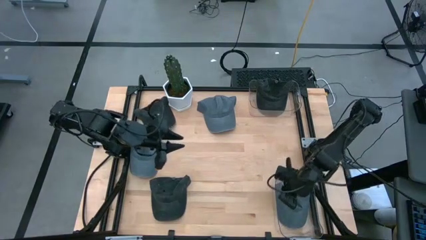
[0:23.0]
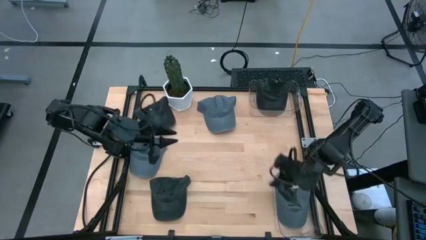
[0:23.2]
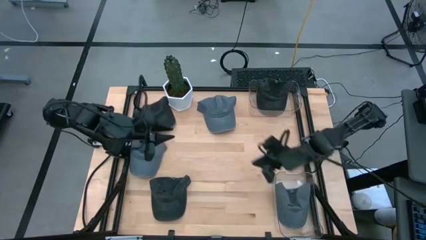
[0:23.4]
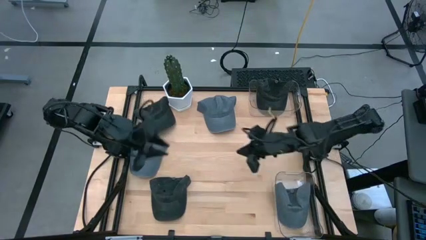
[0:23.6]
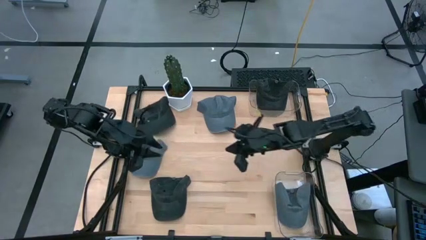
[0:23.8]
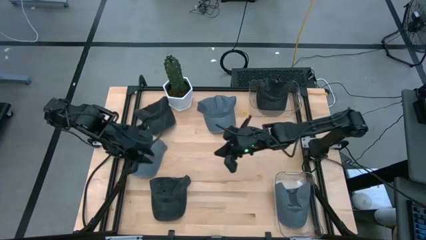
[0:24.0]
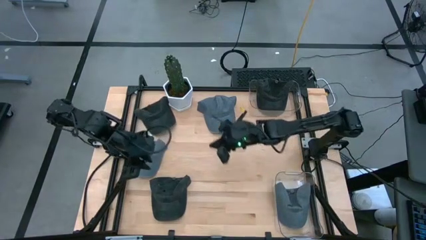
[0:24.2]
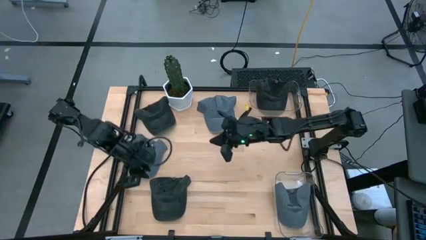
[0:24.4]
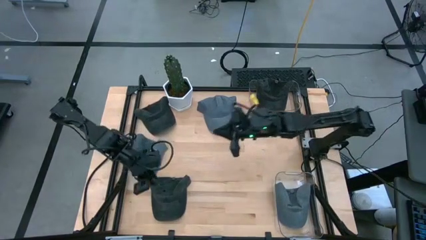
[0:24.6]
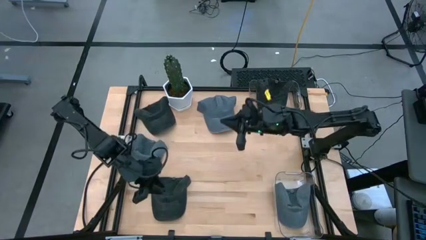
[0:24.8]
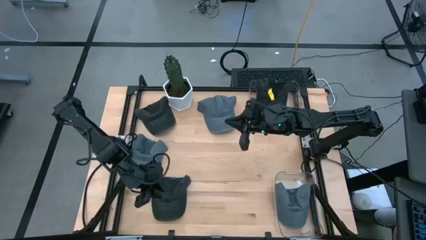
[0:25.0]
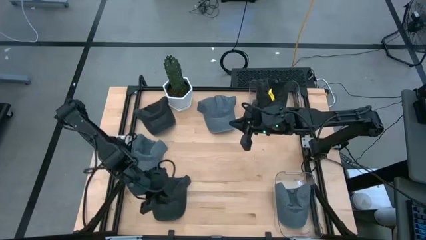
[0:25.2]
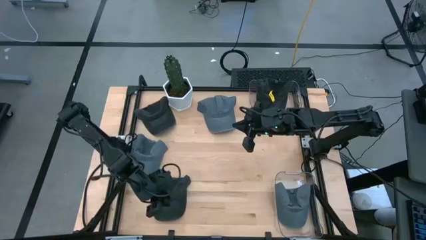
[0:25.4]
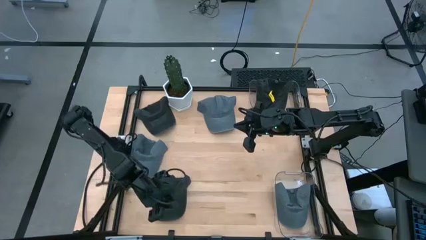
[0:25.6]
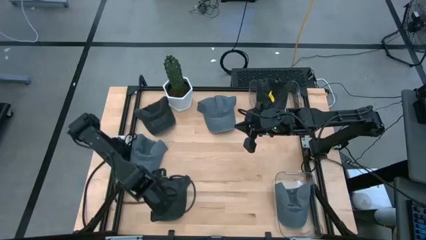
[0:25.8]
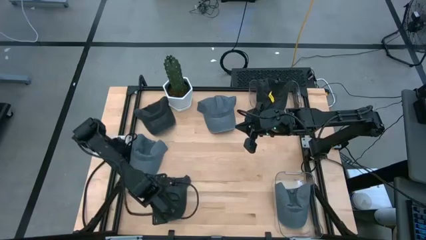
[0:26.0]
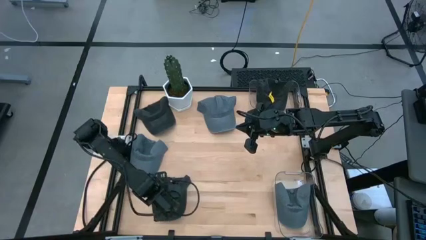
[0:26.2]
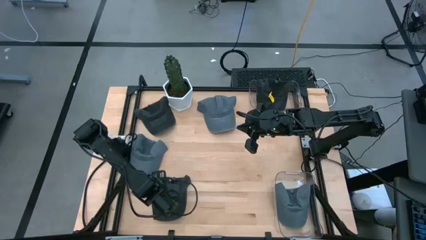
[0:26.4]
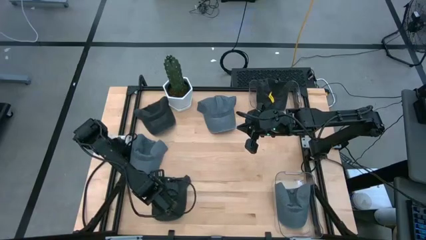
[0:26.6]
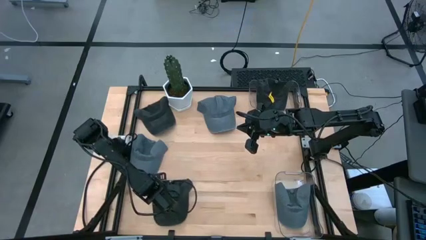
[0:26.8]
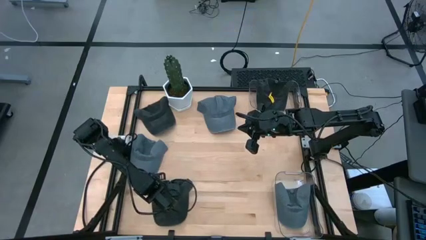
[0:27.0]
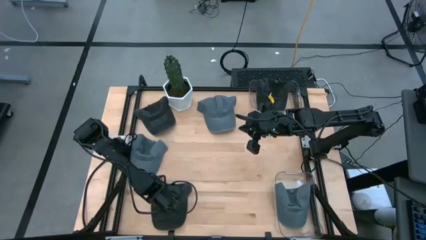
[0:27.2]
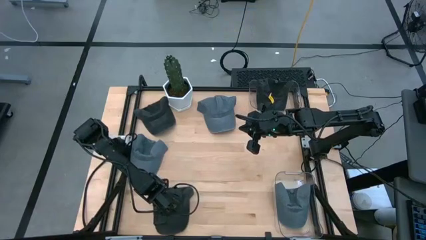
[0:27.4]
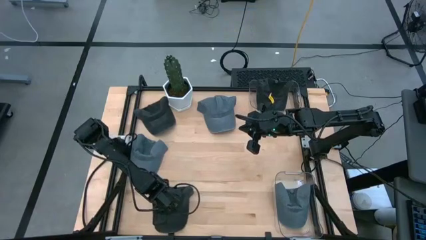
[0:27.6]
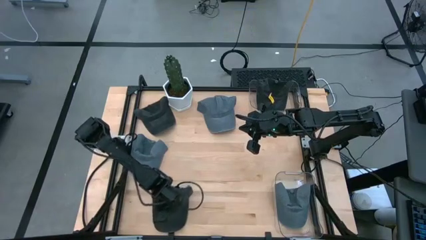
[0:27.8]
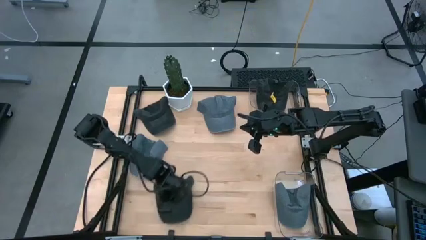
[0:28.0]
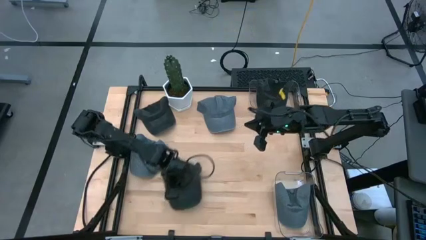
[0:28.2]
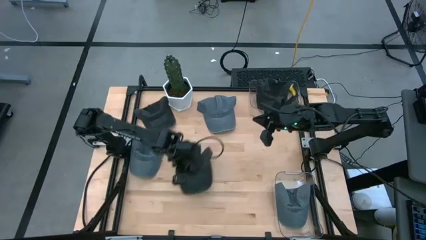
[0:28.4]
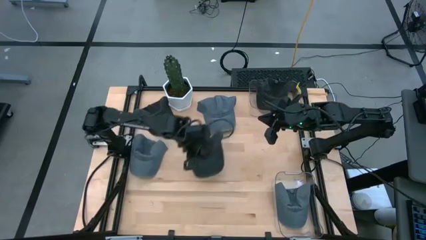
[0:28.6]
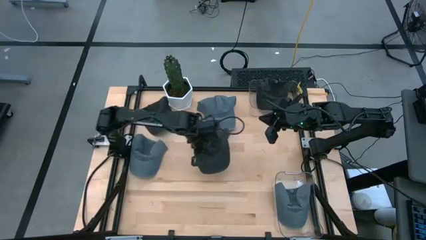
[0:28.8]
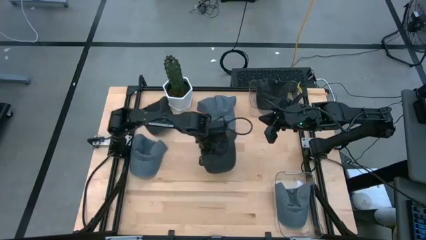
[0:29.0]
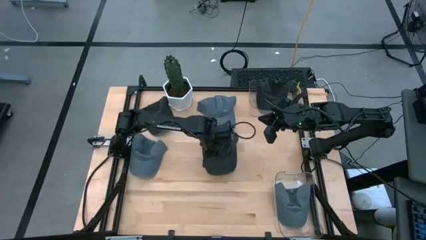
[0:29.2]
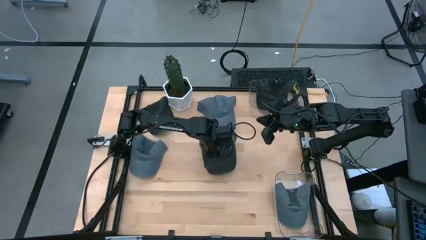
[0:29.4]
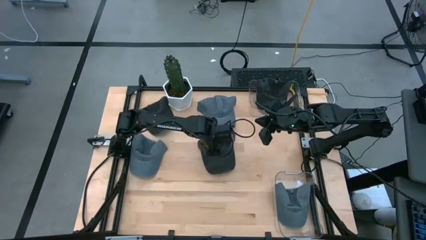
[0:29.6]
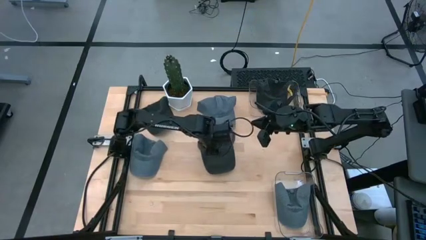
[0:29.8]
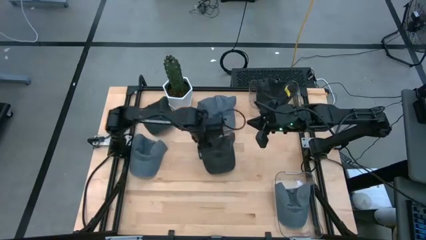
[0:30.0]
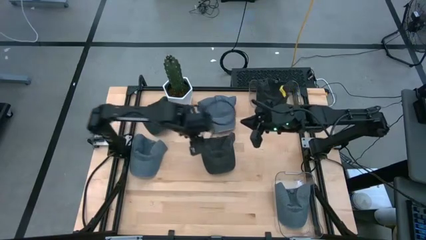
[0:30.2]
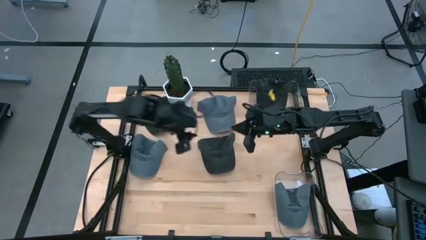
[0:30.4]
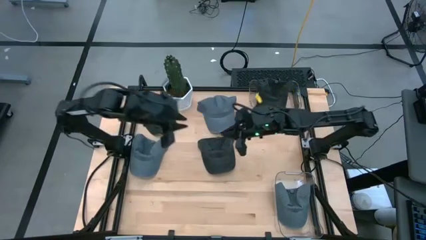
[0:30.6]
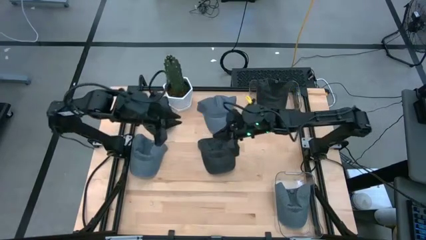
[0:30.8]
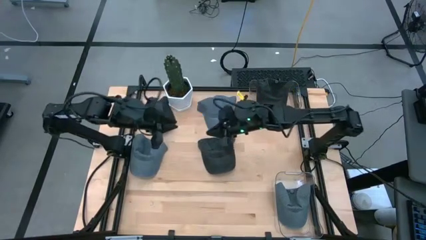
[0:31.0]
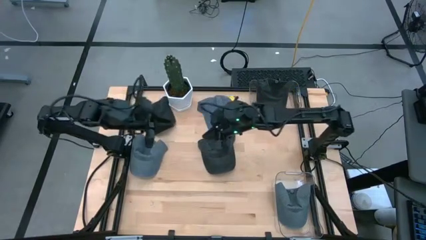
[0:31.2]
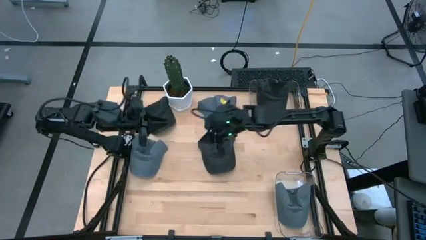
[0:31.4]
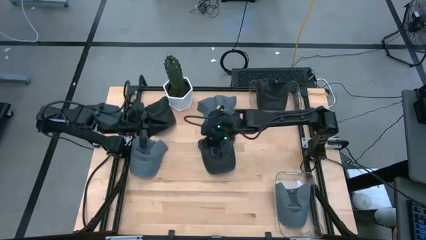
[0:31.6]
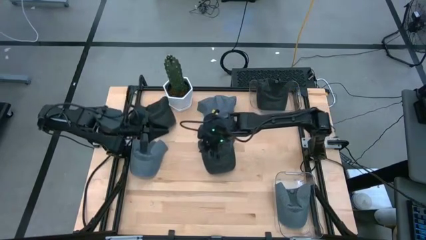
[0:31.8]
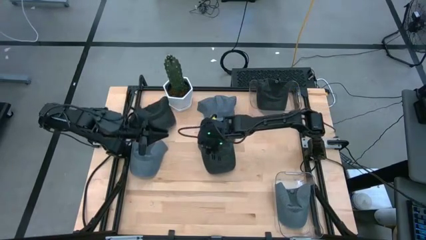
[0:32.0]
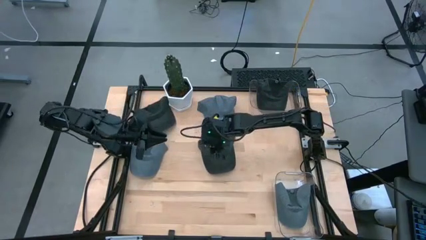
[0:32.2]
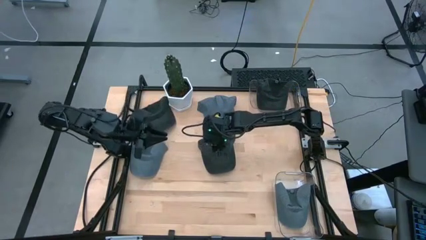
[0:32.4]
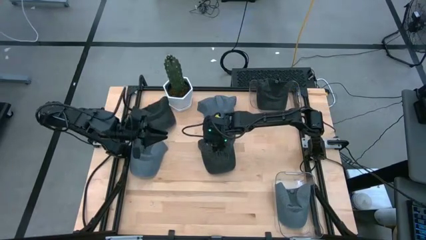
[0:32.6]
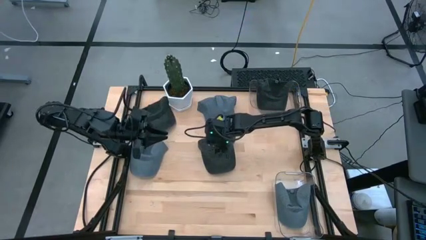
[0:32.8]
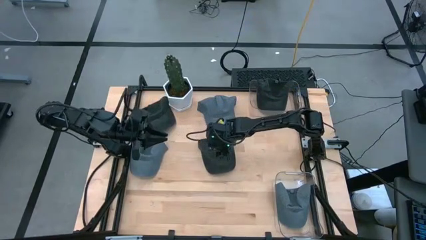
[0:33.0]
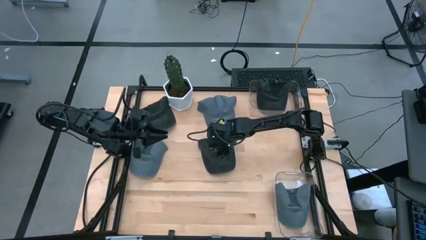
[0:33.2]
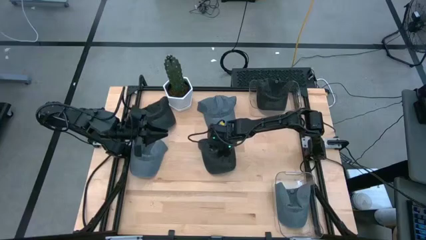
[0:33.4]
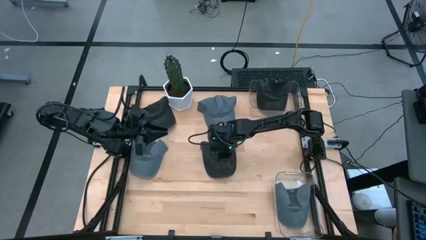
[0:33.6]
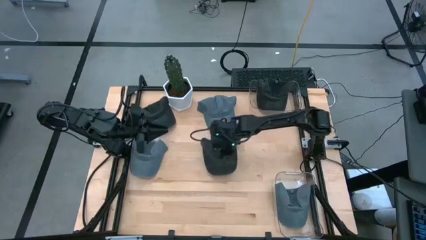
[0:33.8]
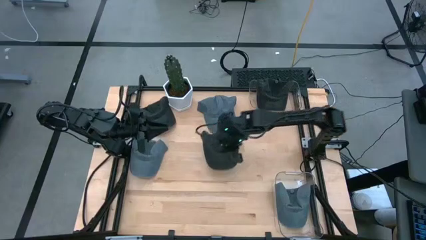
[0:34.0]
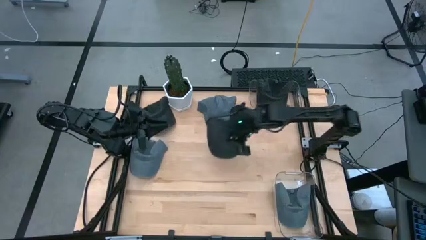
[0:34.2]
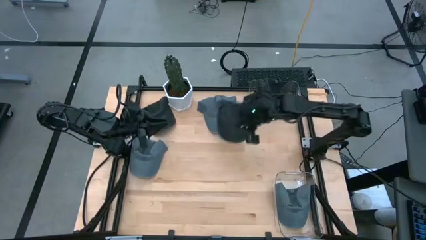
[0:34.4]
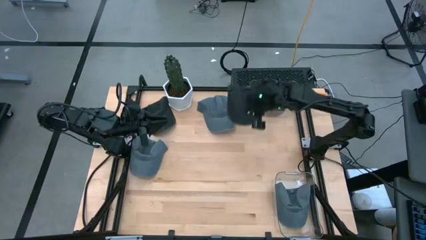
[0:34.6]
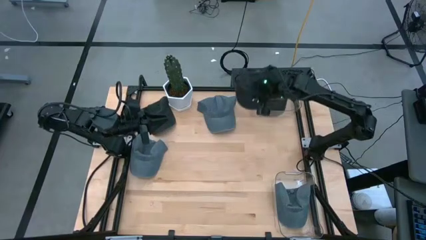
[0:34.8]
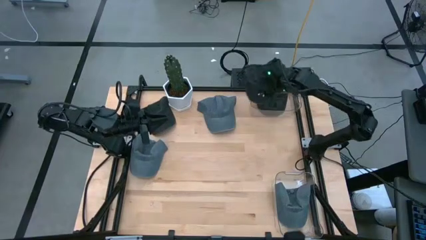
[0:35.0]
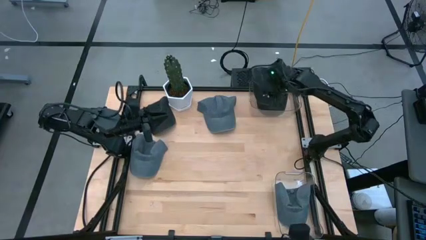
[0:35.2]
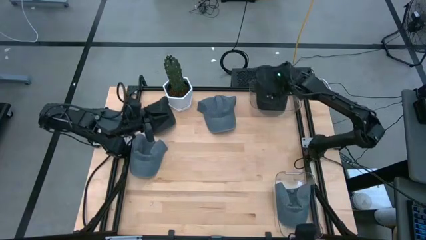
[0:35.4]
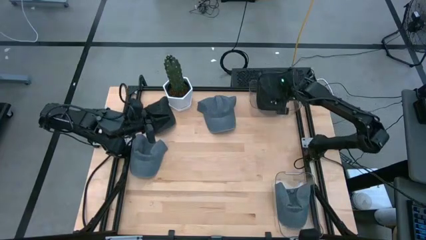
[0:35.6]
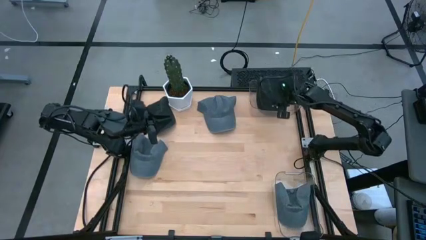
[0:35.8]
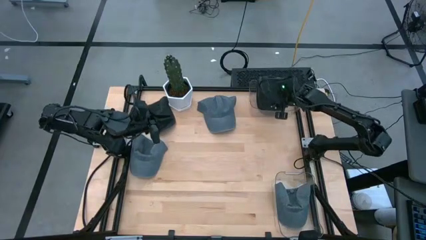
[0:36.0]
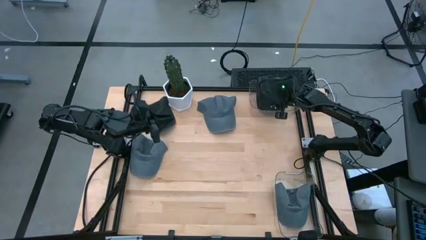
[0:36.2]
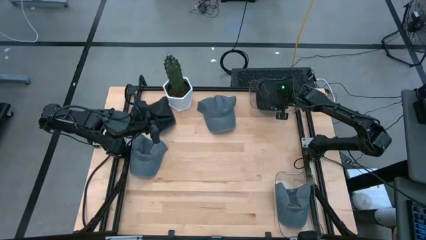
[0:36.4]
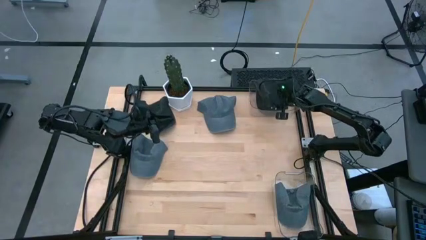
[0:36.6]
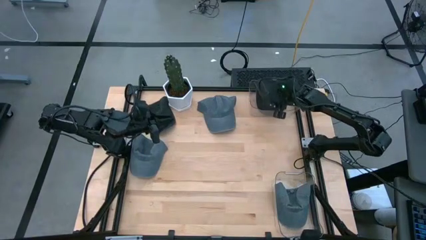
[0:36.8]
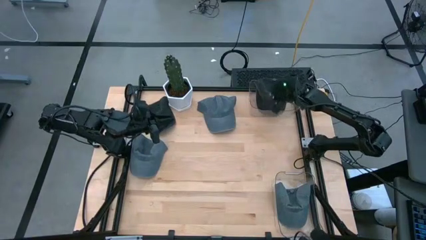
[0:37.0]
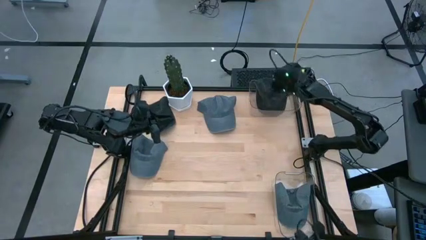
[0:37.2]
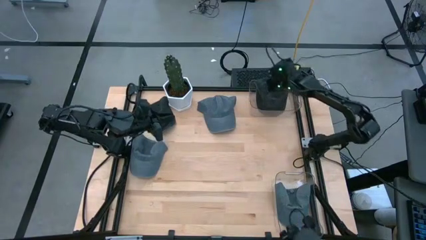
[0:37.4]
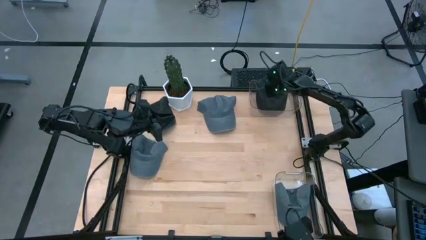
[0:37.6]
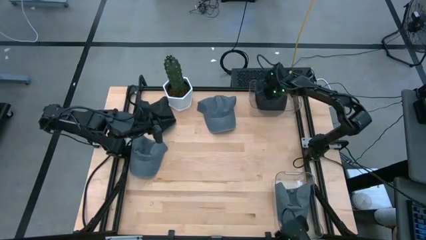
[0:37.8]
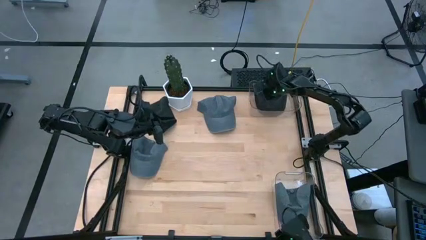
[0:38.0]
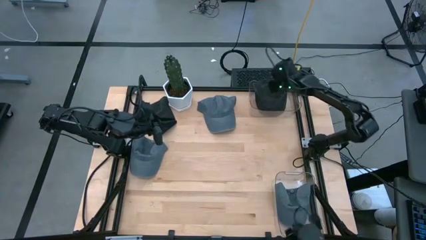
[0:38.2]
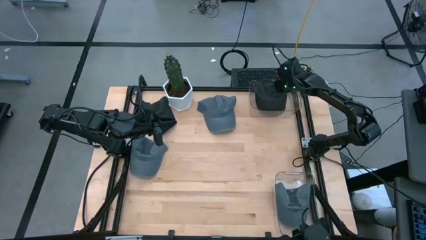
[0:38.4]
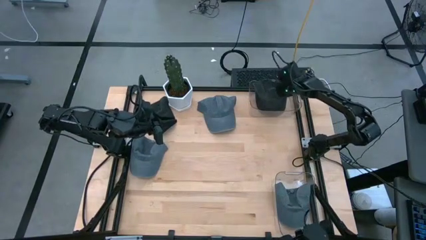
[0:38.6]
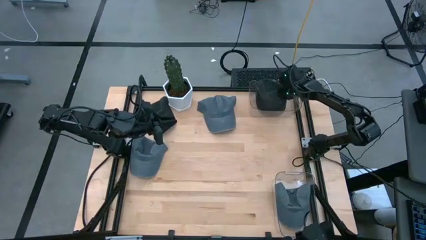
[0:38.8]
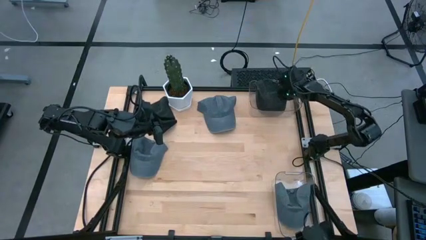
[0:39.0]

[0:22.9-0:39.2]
Task: Pick & Place hat
Put the bottom black cap into the top transparent bin
